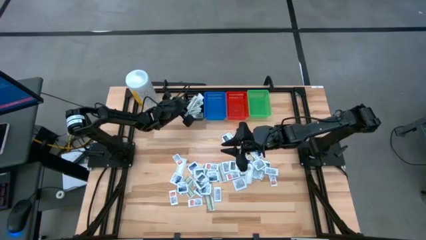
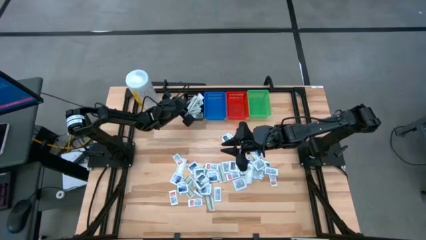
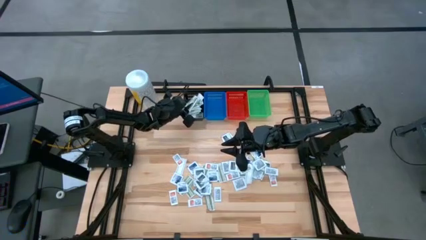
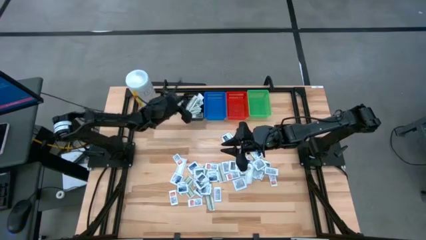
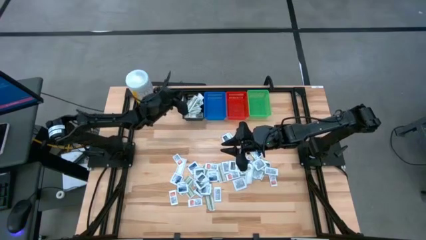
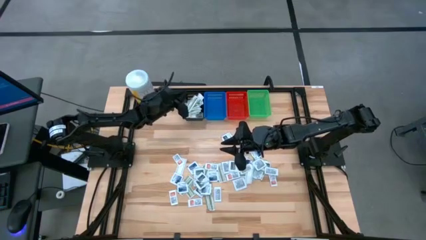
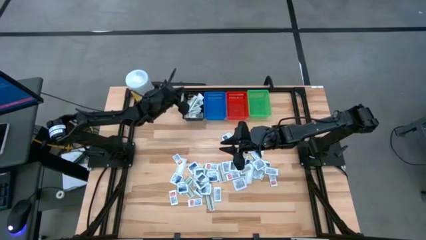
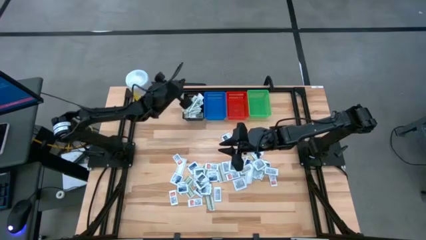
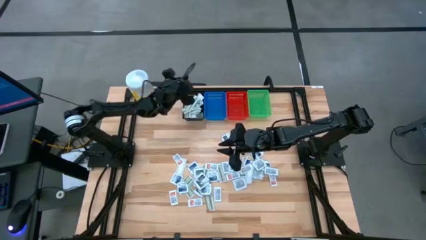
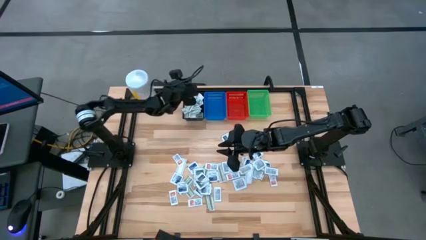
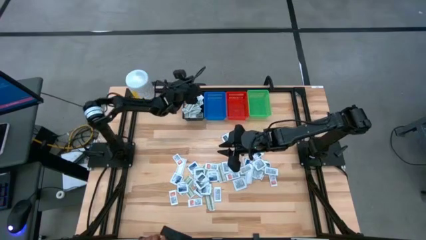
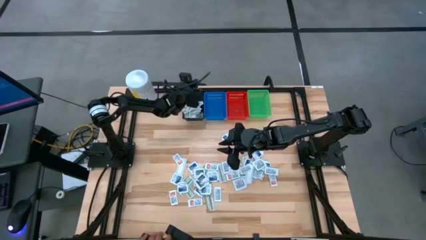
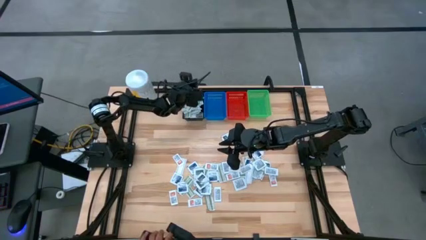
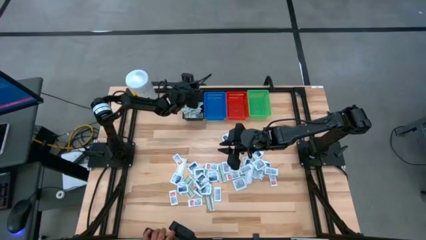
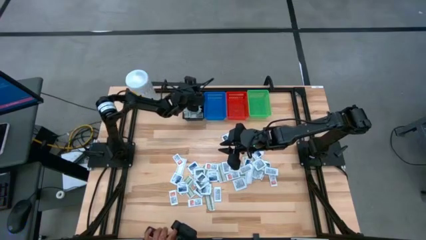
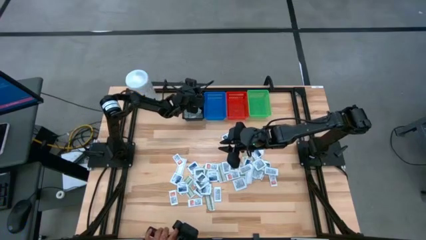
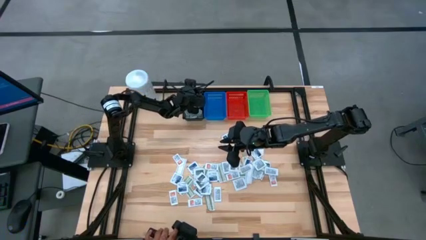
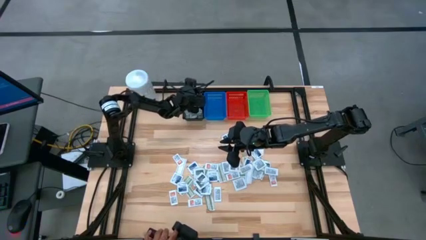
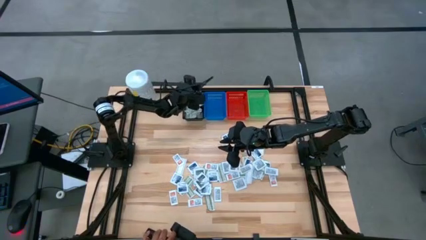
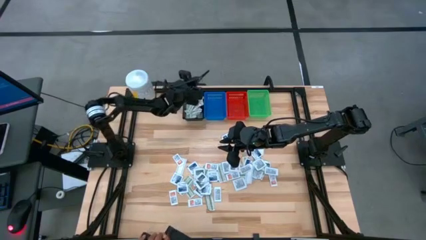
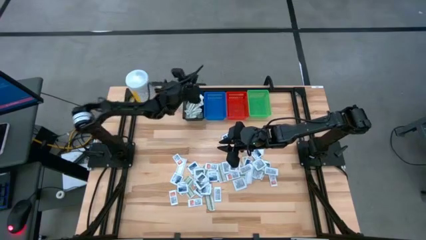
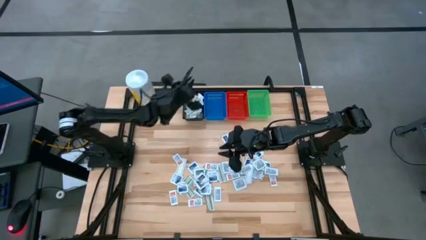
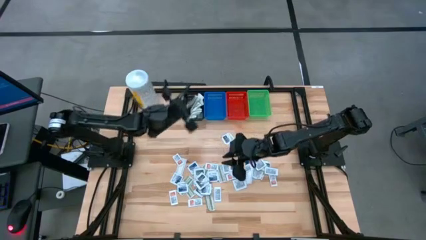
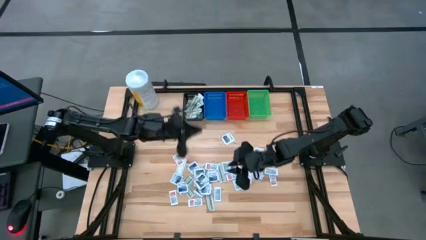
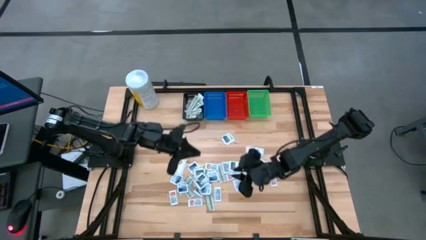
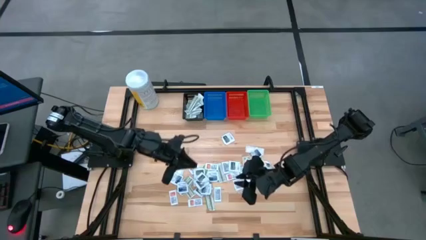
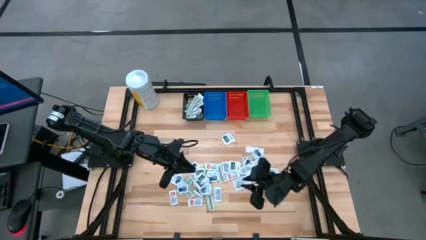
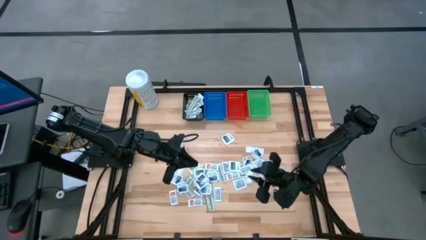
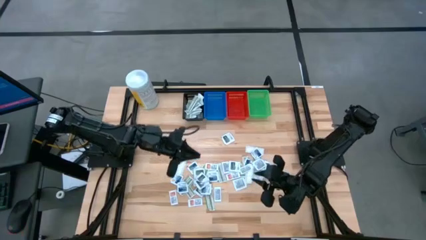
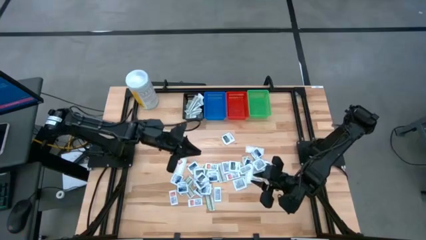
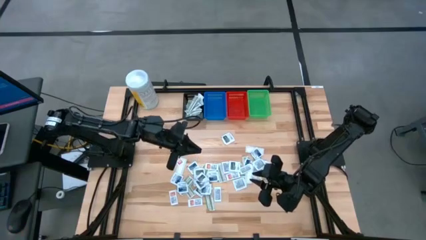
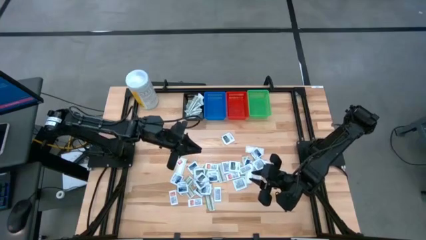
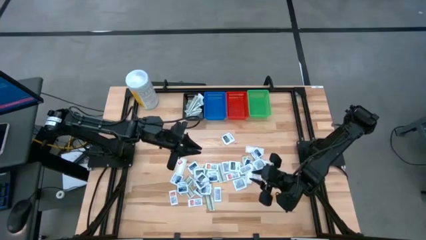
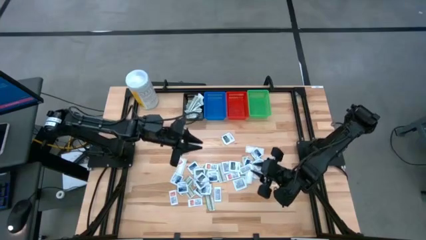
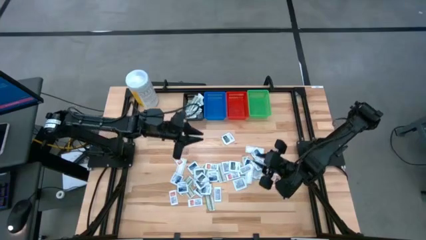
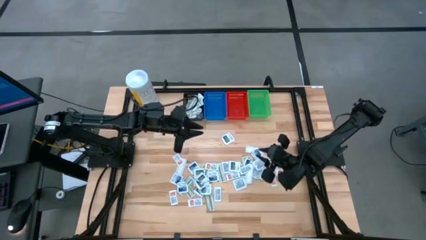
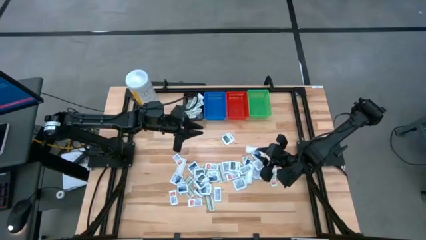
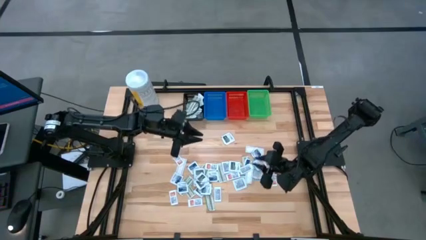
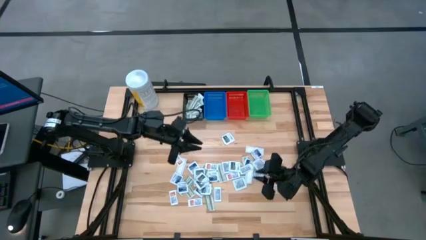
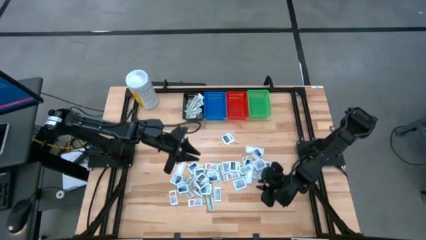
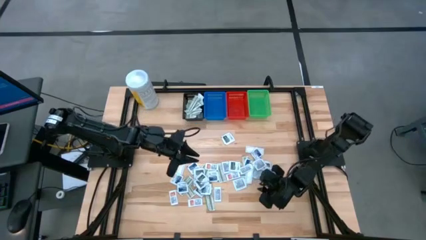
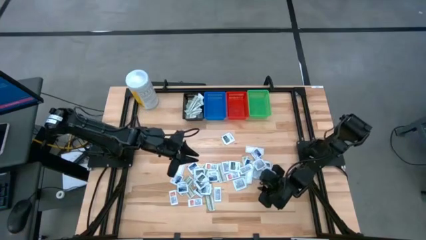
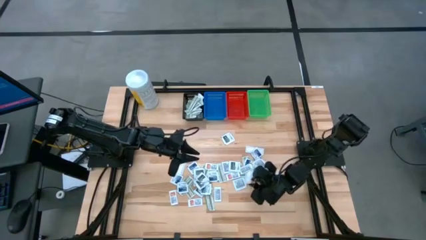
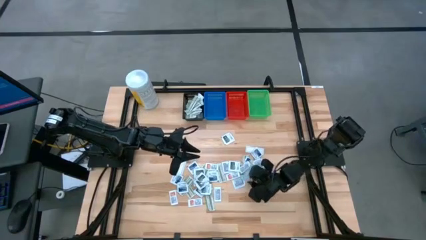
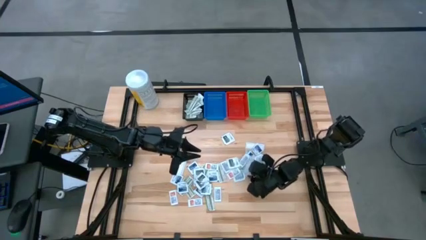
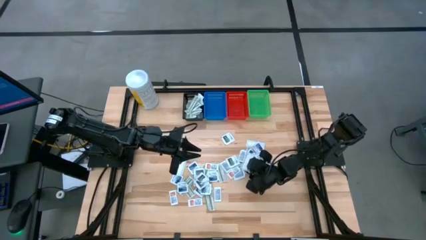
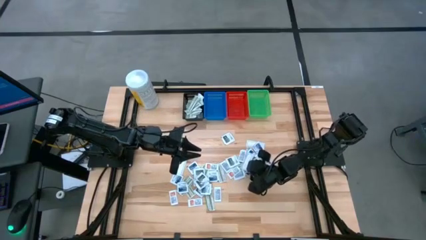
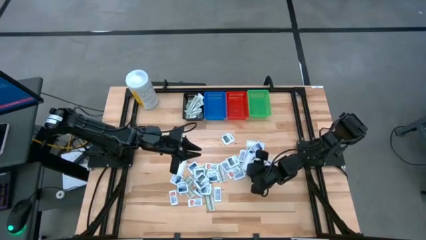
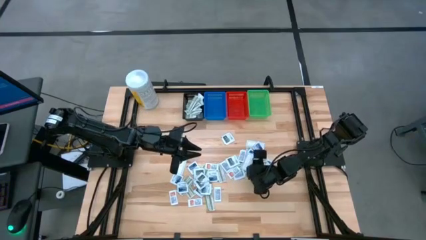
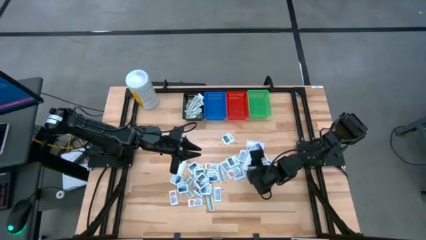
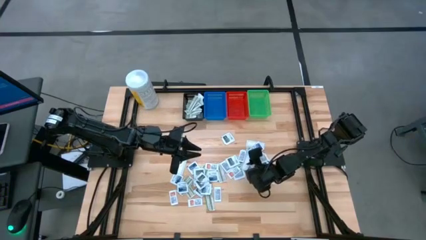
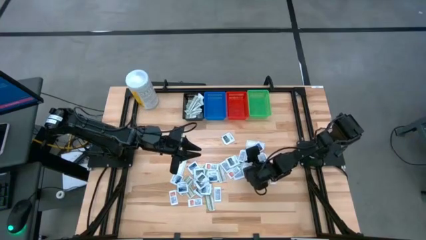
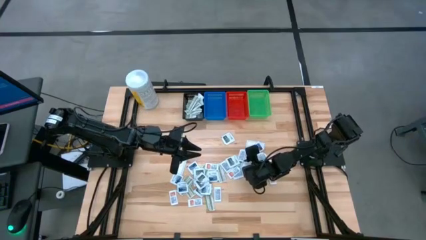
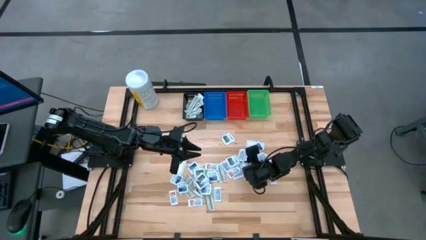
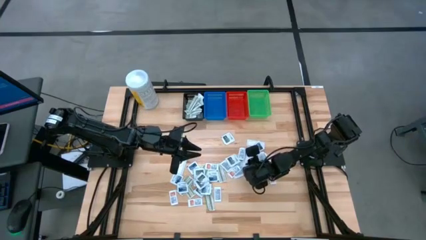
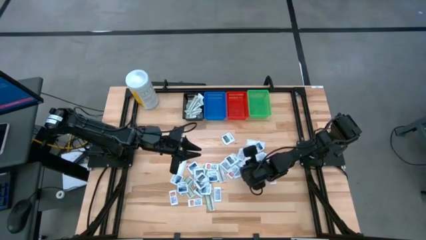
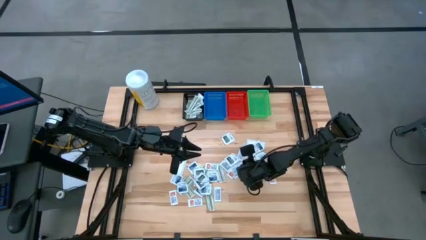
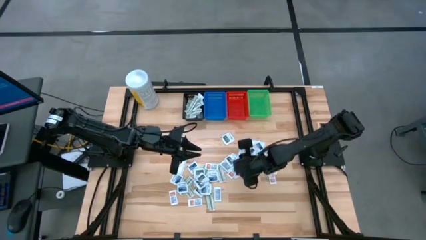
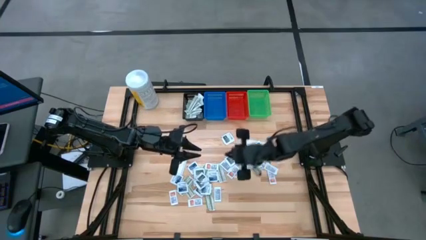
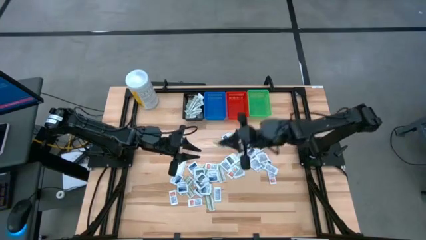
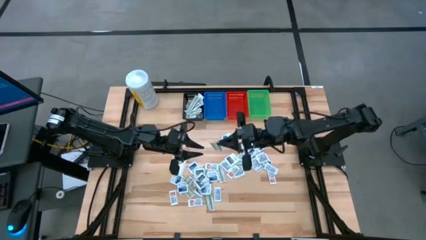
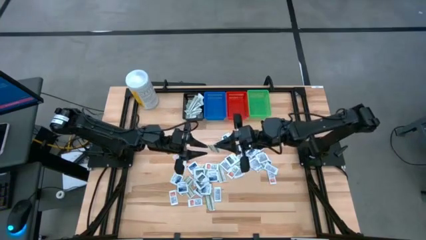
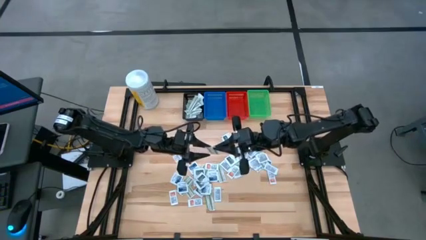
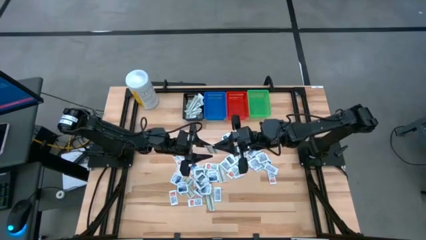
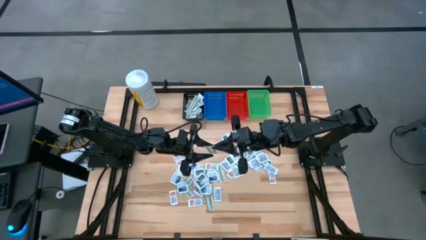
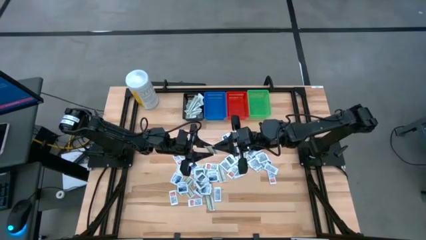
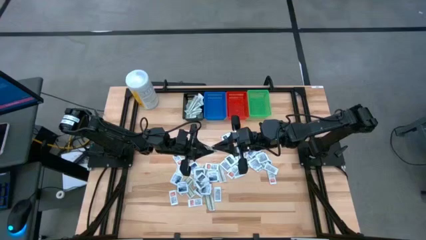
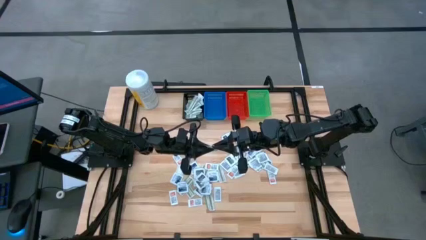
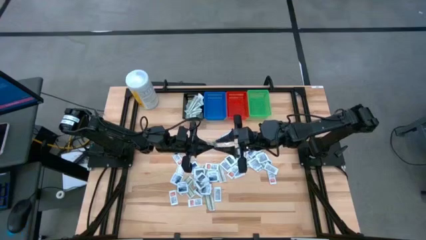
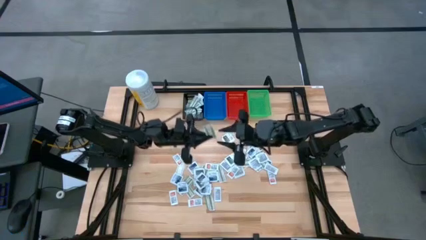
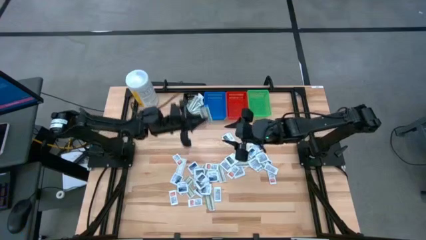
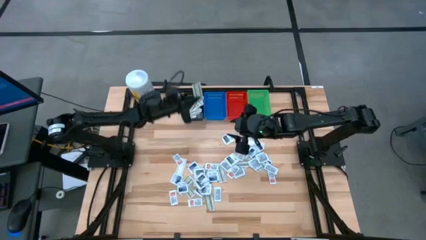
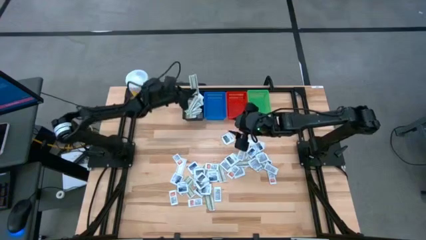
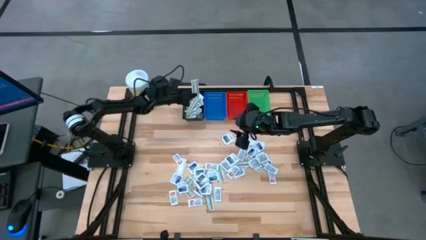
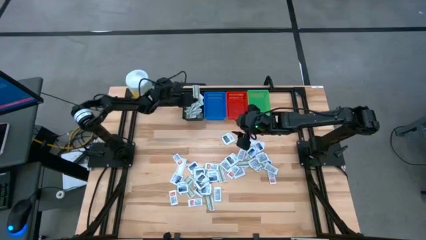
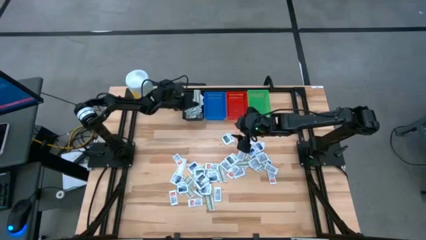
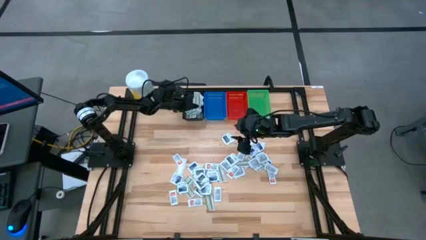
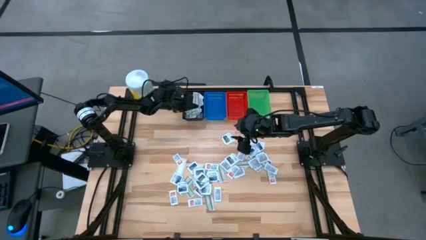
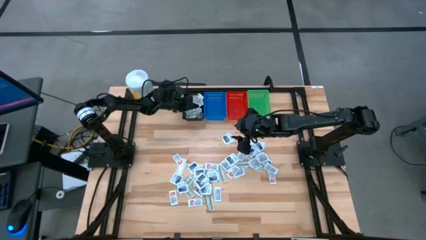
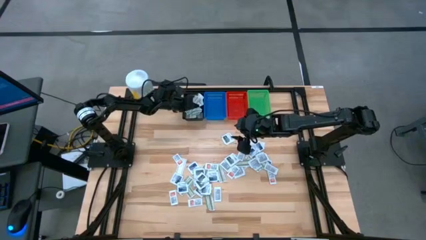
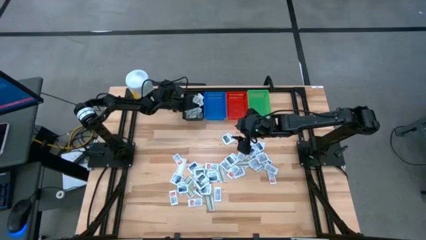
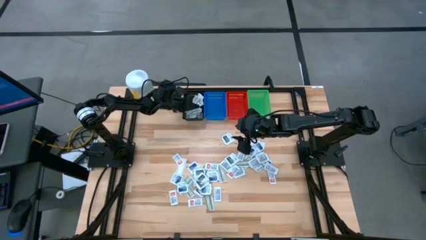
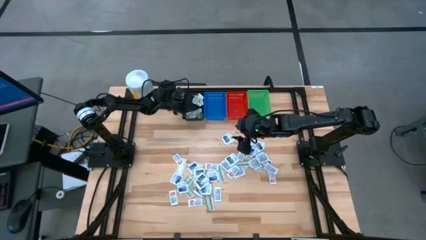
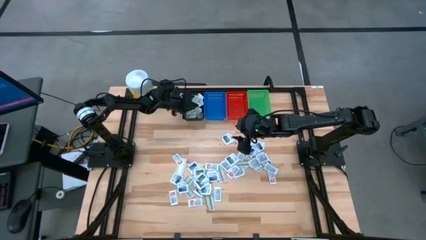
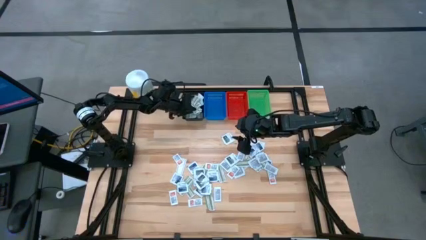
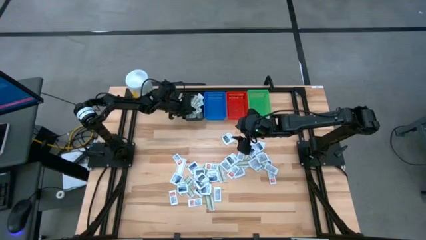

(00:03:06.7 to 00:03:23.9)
Task: Pick & Place First Aid Supplies
Put the green bandage pack in the black bin
